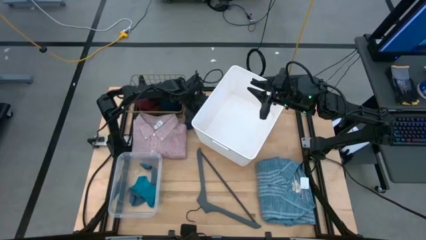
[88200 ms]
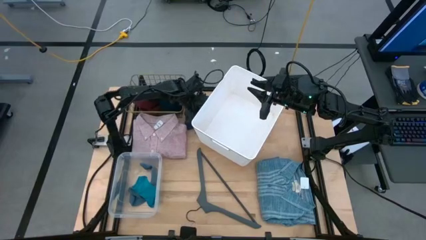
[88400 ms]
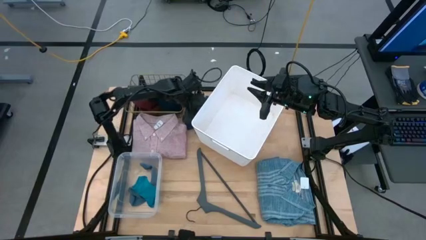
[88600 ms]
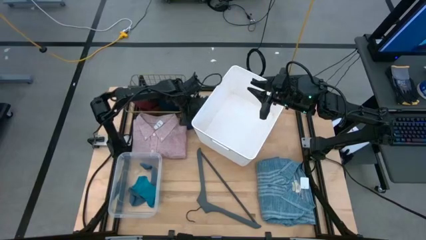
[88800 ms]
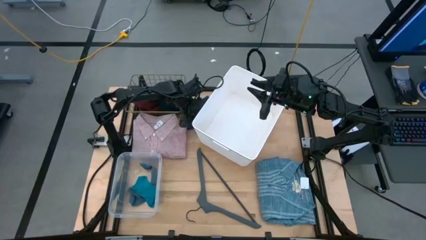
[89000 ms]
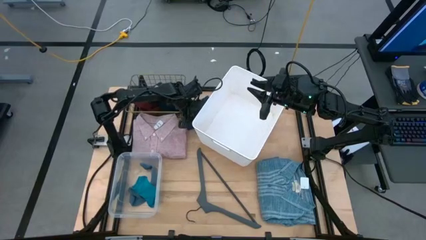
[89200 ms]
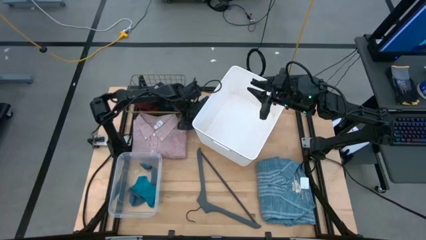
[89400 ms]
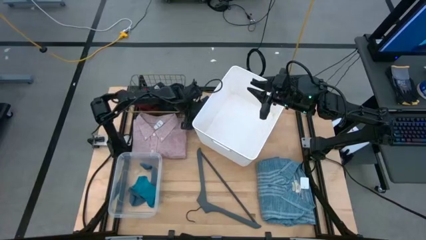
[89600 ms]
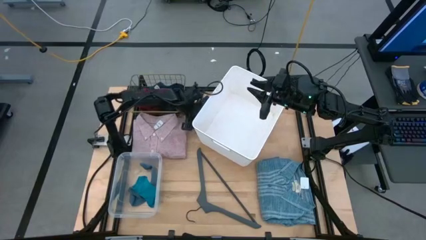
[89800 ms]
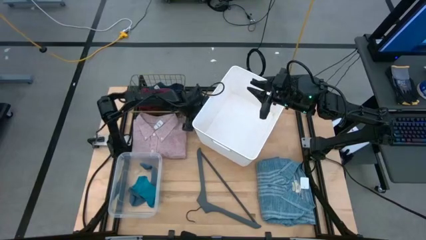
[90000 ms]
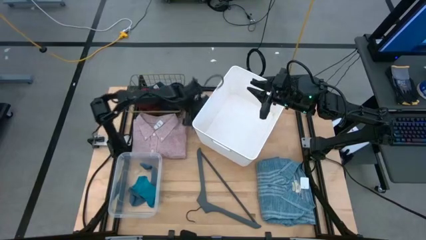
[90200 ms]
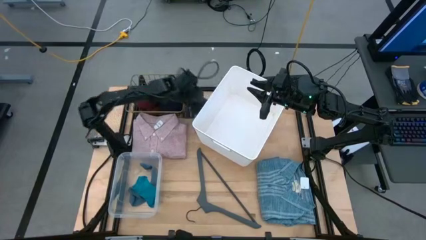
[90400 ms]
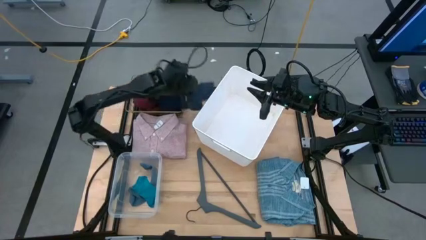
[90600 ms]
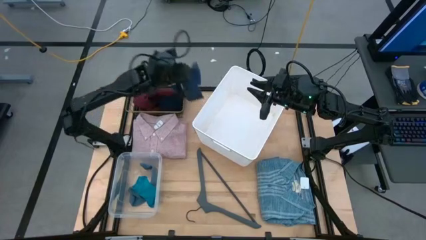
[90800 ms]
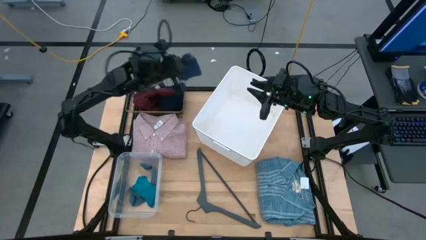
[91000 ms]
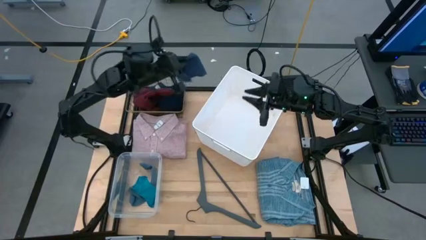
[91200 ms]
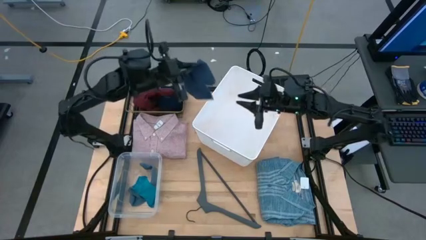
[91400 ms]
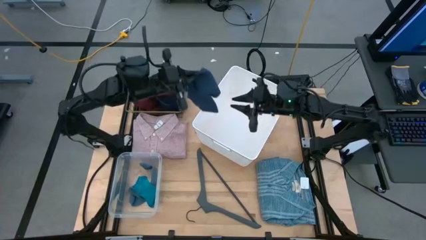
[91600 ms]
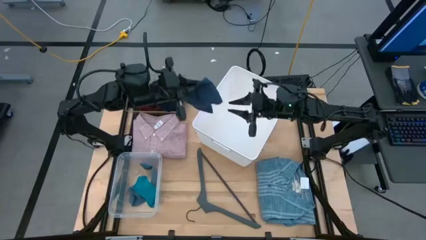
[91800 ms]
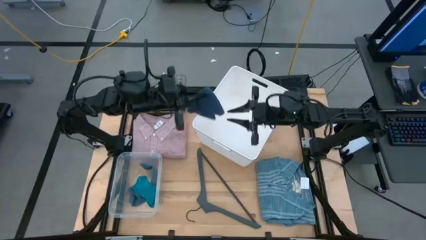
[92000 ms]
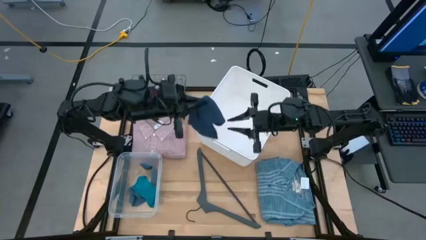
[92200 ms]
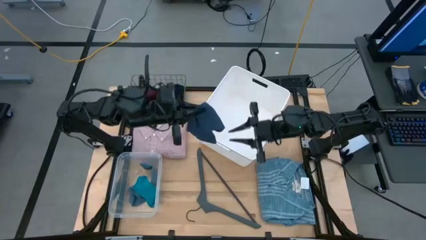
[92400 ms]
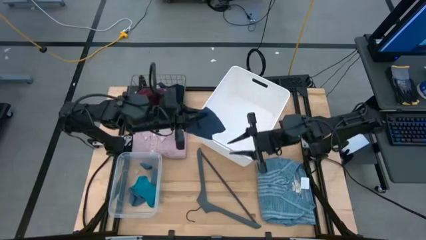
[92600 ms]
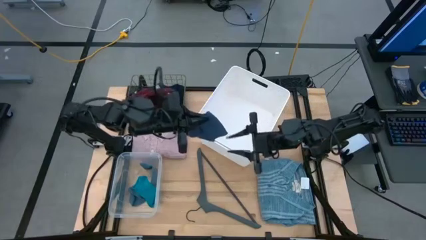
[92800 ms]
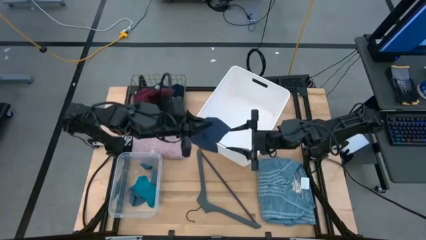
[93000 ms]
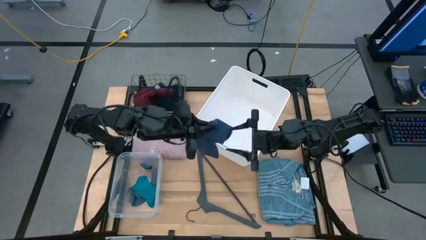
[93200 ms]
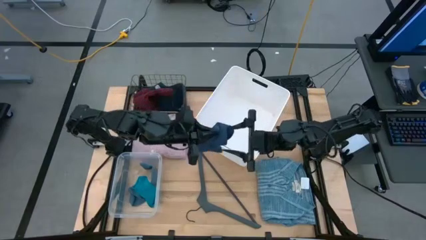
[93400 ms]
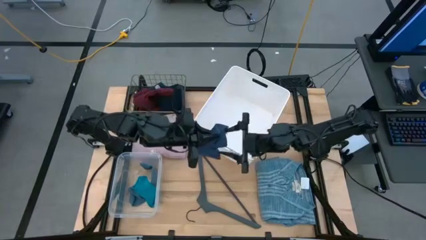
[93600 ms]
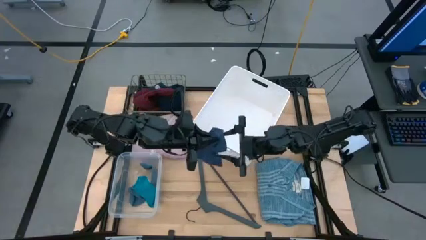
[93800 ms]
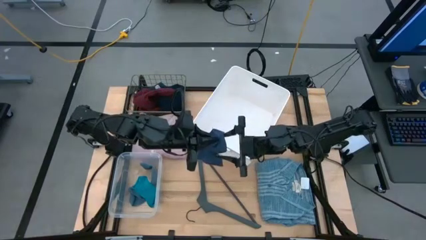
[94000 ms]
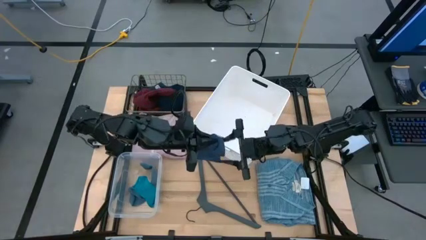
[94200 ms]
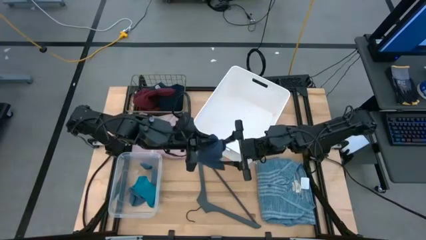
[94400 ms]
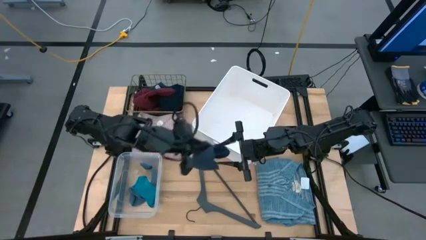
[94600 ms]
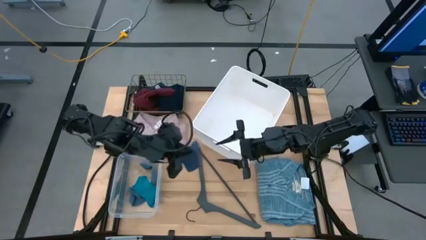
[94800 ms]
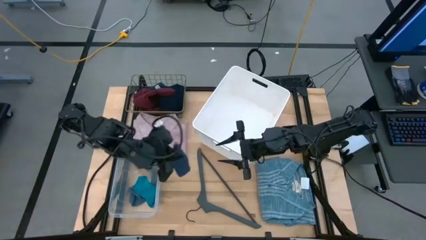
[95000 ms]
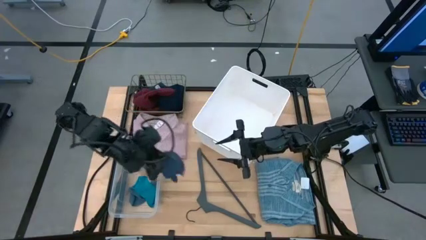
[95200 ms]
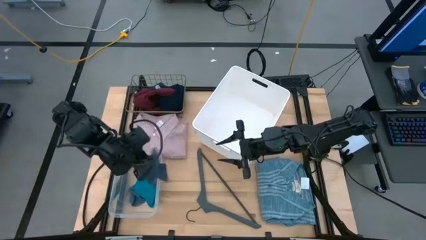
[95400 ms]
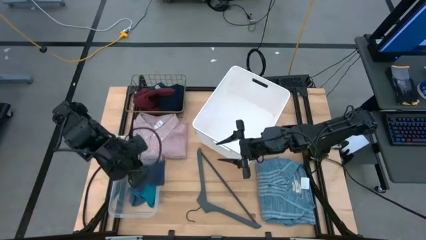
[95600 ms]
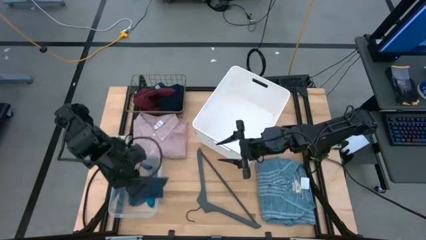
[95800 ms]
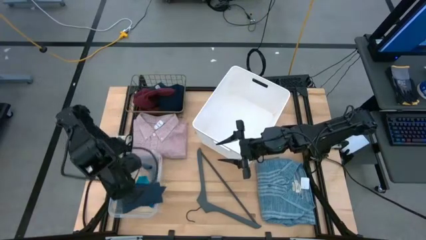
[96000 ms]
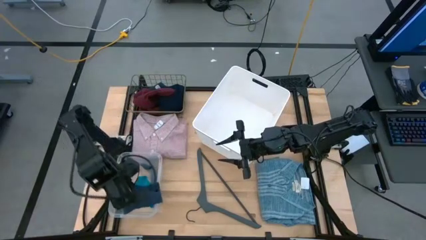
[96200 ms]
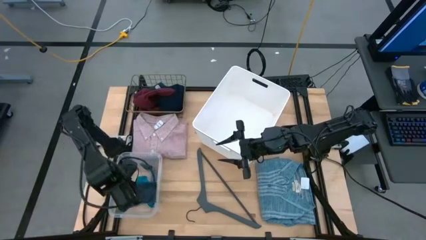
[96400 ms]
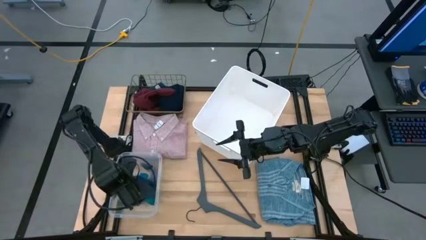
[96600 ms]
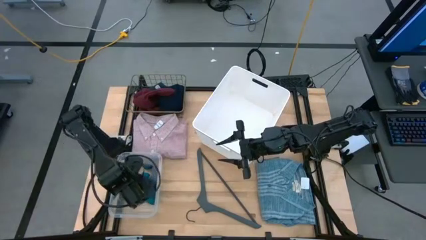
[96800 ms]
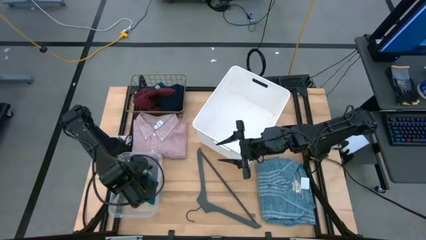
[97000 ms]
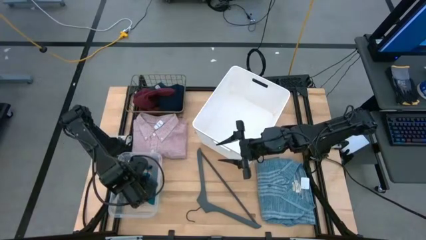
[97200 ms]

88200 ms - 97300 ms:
Task: Pick & Place Cloths
Put the dark blue sock into the transparent bin

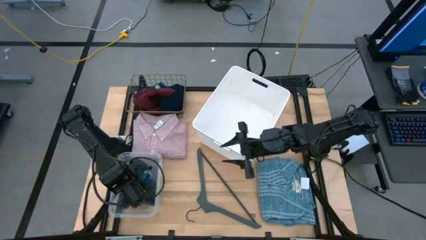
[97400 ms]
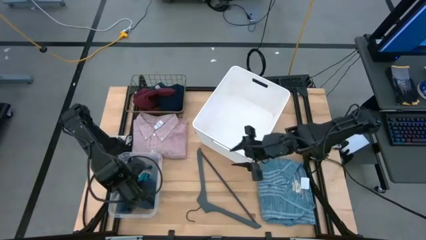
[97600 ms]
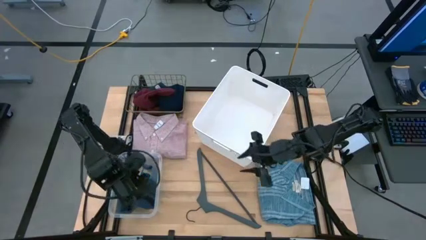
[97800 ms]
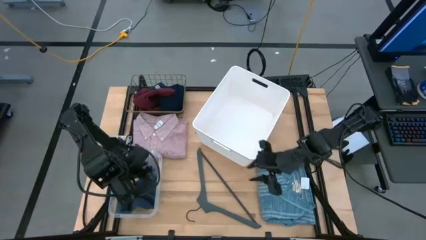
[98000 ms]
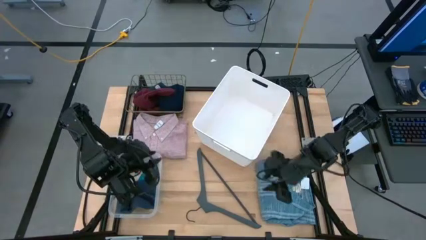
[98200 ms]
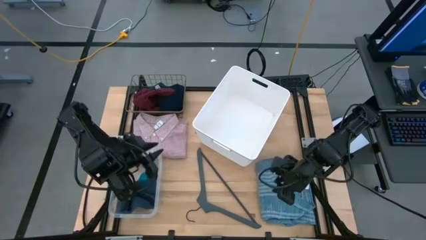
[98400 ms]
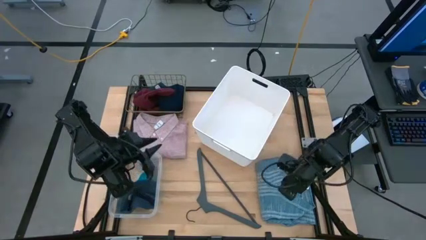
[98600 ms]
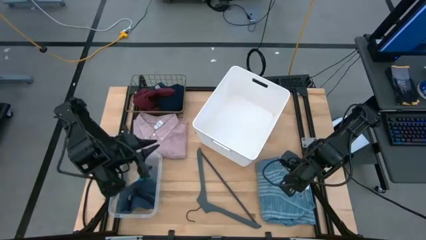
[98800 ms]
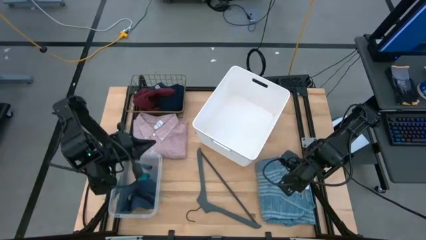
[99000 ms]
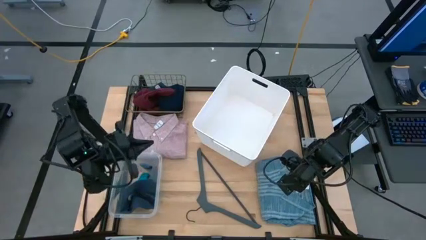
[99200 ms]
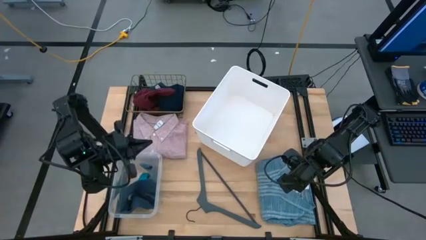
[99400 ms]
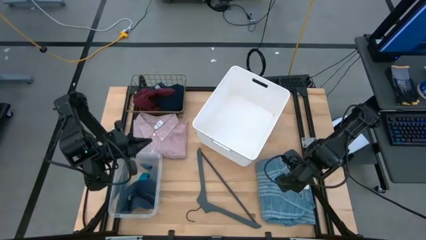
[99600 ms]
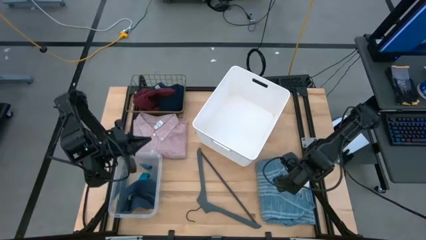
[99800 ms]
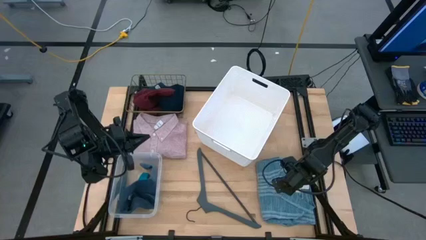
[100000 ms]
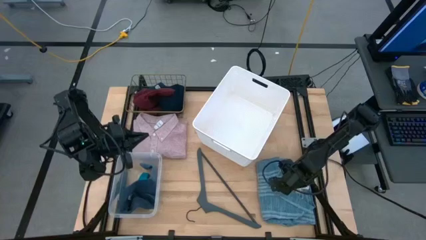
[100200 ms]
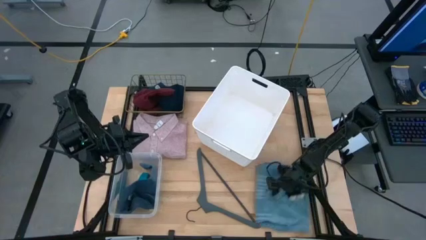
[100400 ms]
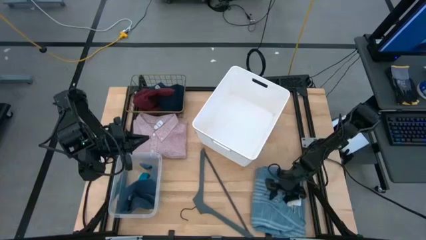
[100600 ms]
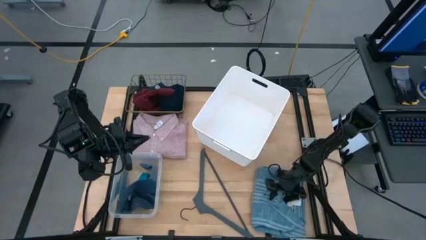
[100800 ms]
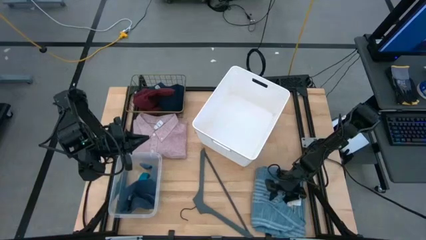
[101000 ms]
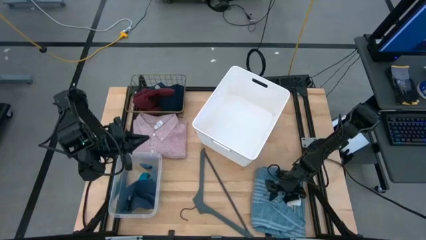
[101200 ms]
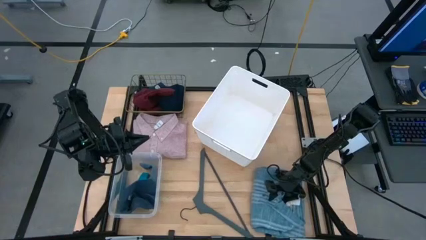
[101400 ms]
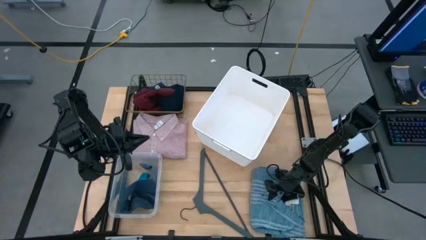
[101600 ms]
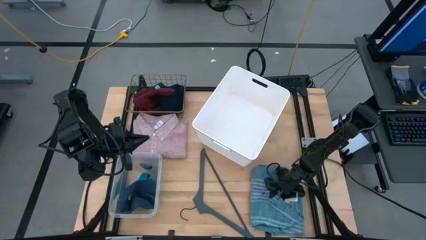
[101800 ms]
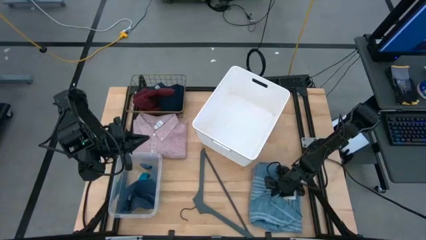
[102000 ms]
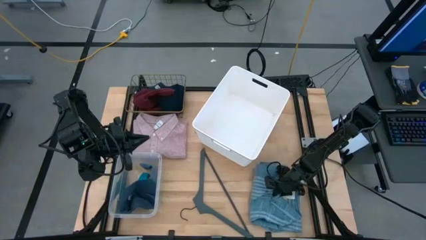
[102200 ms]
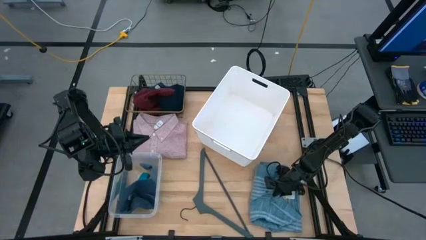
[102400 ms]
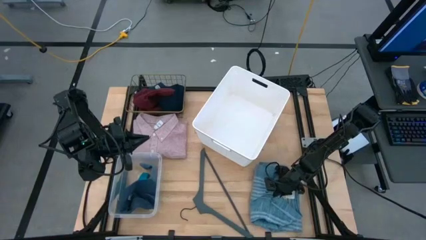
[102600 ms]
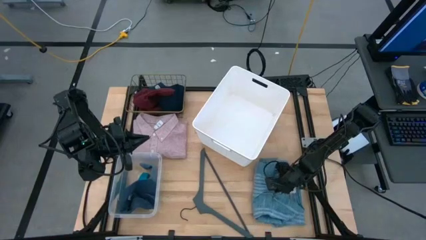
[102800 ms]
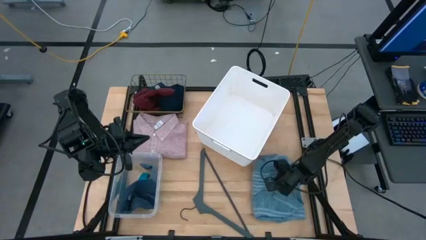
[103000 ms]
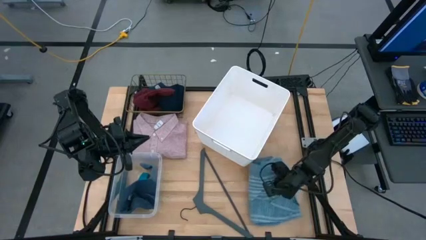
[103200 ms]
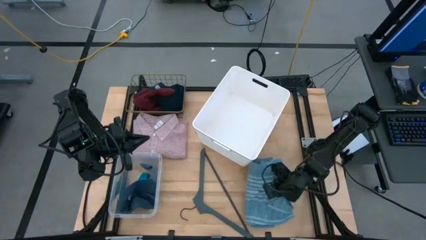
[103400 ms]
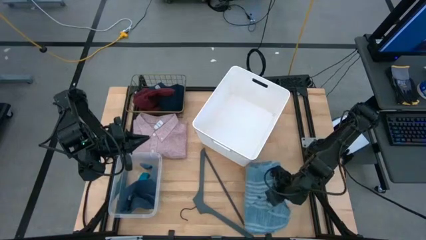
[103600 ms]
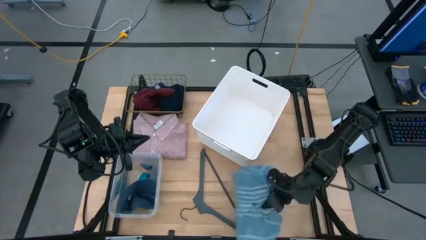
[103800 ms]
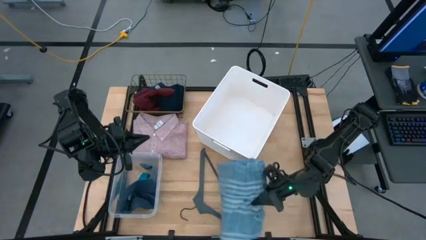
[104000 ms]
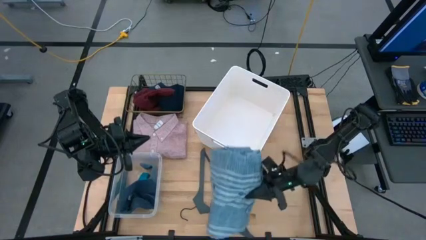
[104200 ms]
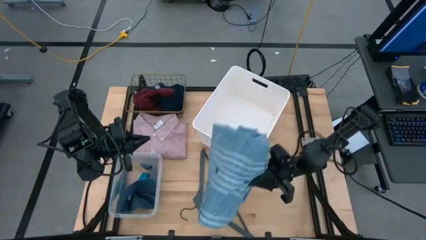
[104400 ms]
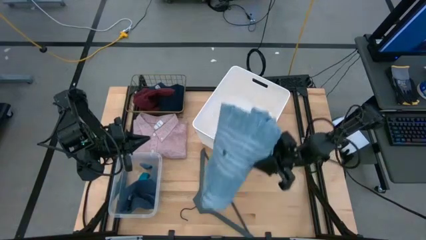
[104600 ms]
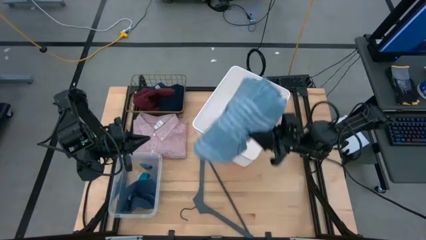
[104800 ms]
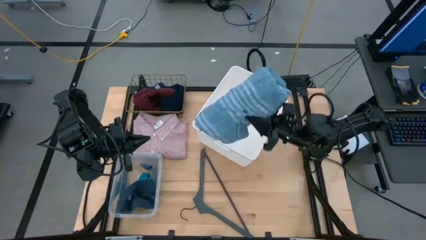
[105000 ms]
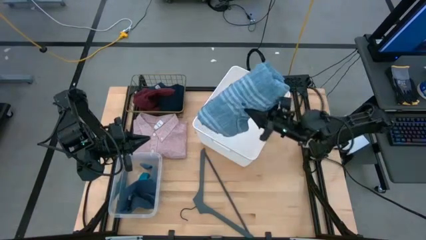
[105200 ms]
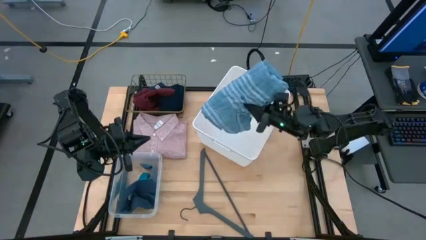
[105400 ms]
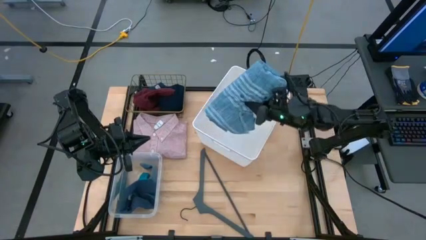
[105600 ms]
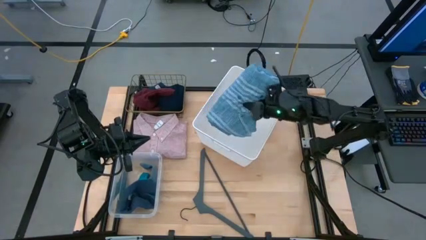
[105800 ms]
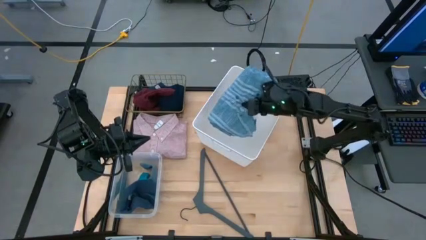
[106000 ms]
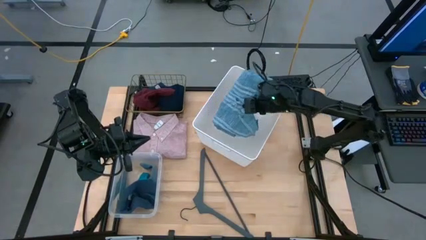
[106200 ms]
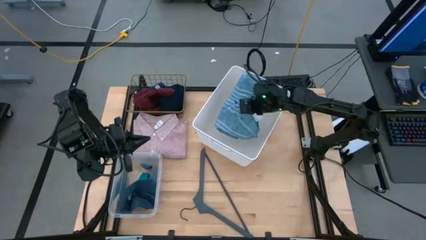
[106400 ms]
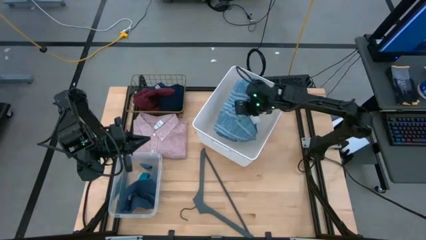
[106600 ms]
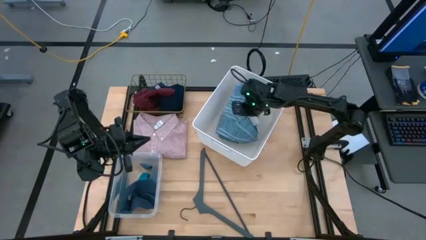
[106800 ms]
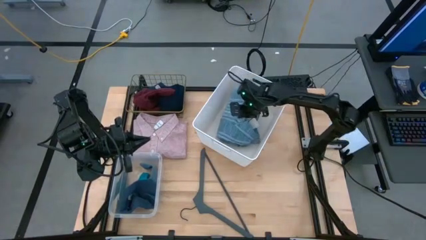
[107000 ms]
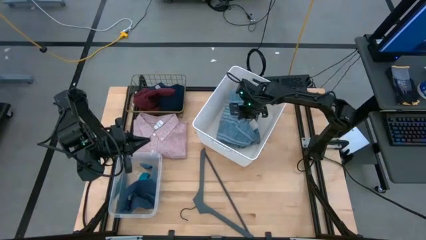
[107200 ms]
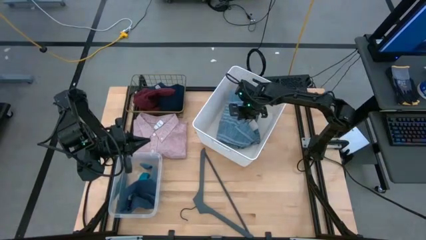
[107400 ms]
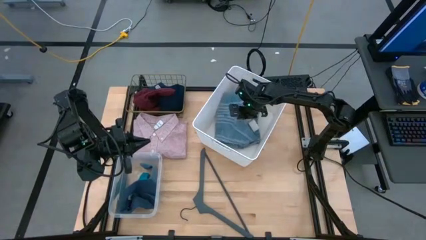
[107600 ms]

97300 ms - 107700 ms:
Put the blue shirt into the white bin
